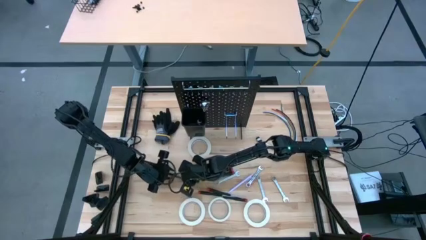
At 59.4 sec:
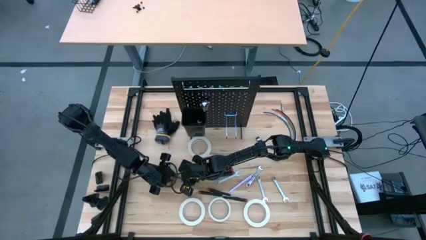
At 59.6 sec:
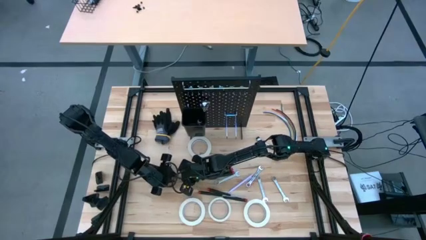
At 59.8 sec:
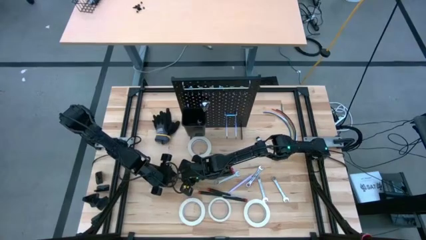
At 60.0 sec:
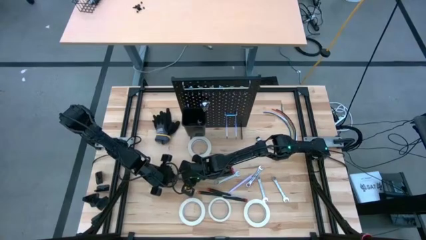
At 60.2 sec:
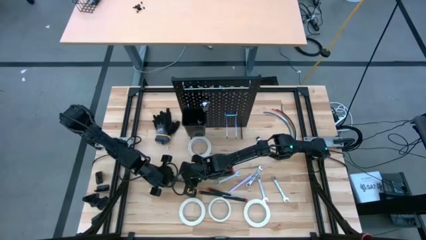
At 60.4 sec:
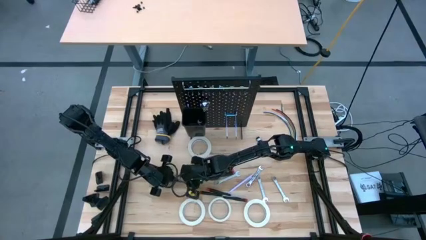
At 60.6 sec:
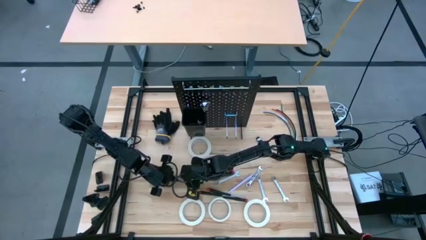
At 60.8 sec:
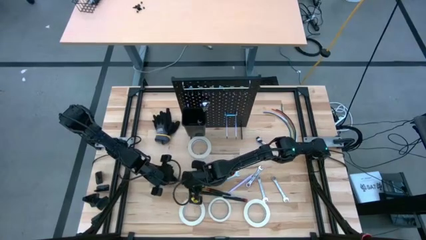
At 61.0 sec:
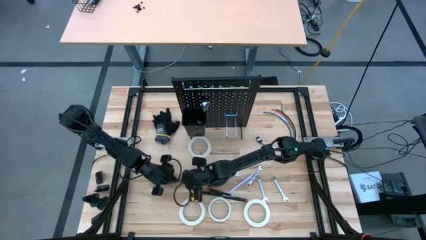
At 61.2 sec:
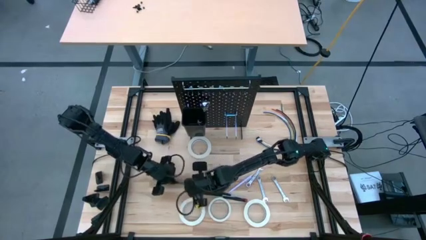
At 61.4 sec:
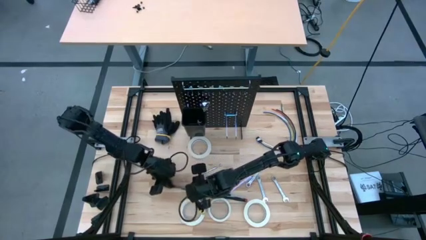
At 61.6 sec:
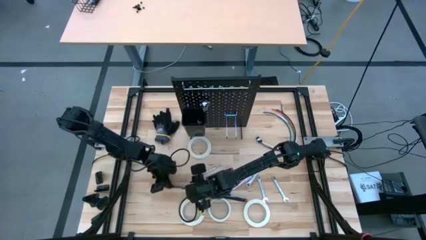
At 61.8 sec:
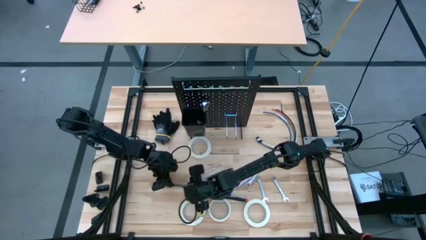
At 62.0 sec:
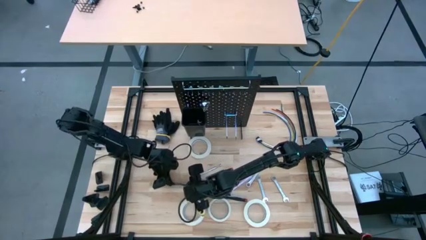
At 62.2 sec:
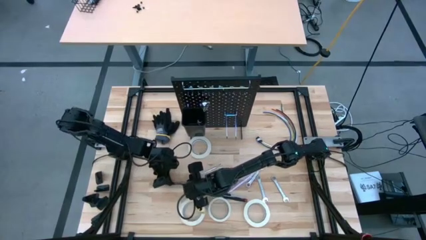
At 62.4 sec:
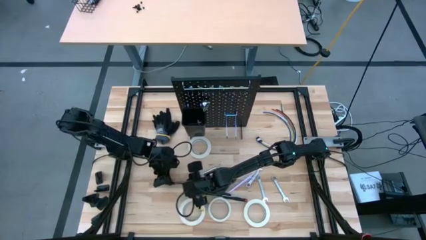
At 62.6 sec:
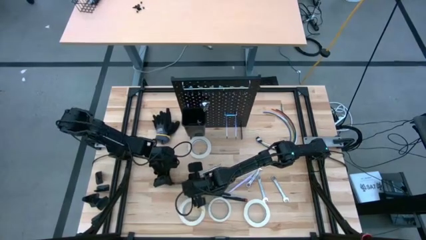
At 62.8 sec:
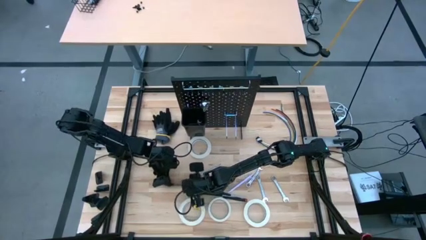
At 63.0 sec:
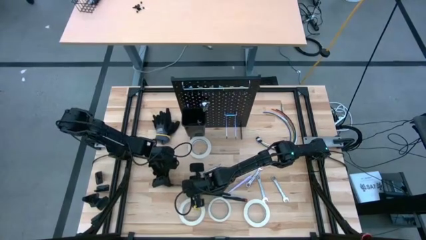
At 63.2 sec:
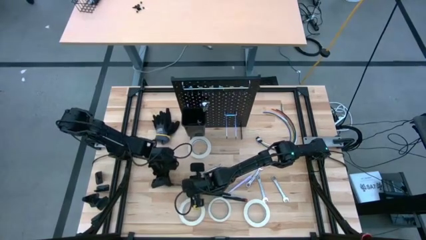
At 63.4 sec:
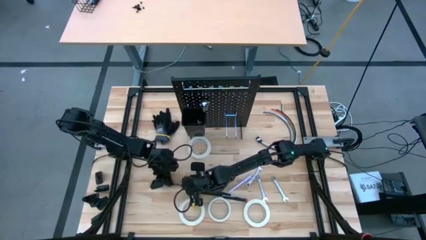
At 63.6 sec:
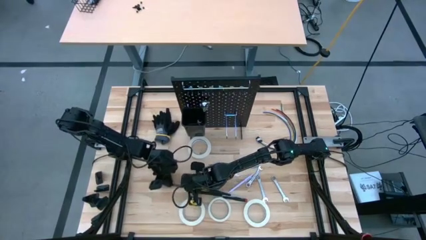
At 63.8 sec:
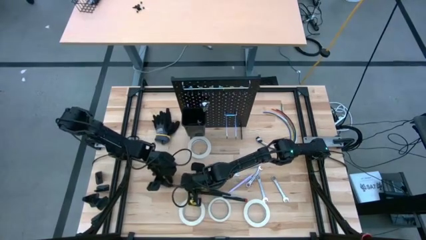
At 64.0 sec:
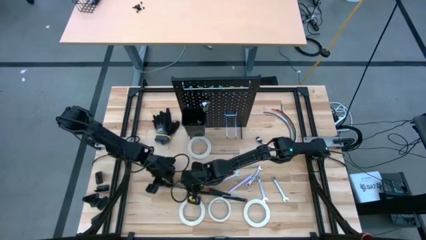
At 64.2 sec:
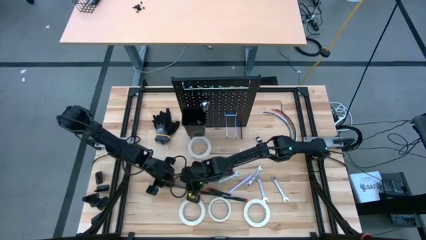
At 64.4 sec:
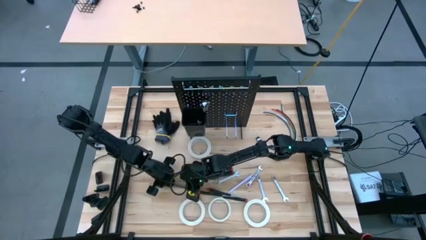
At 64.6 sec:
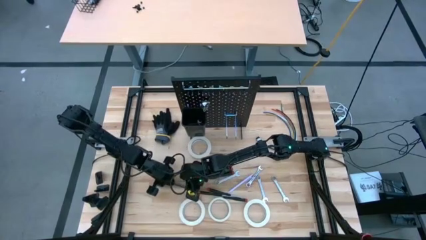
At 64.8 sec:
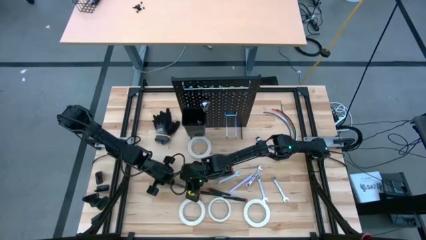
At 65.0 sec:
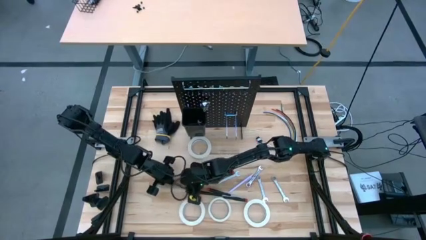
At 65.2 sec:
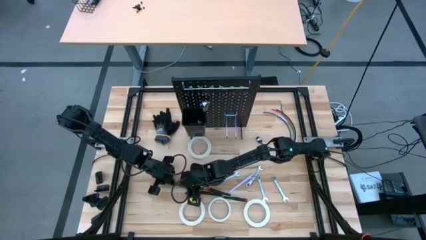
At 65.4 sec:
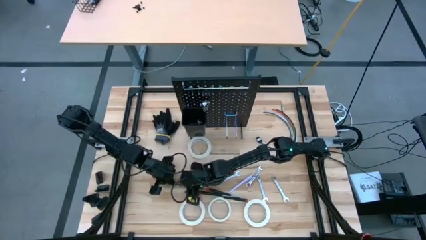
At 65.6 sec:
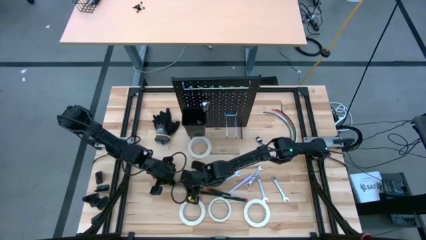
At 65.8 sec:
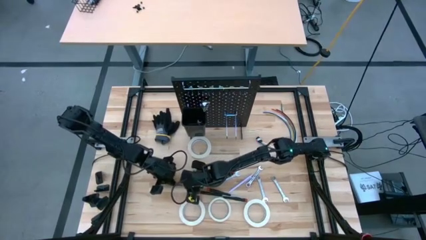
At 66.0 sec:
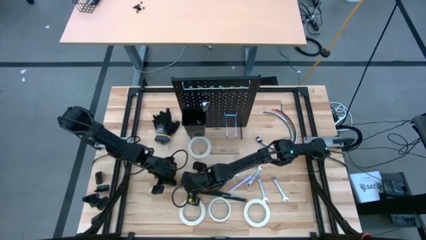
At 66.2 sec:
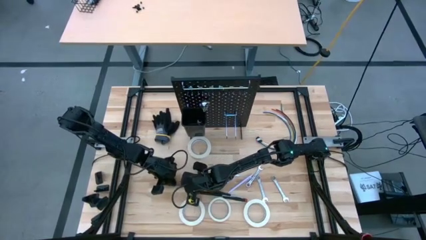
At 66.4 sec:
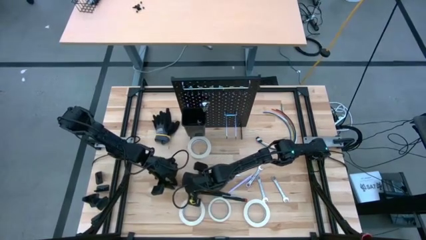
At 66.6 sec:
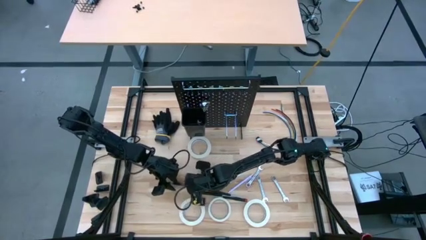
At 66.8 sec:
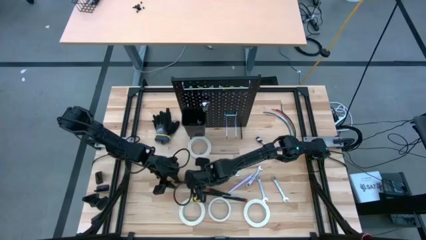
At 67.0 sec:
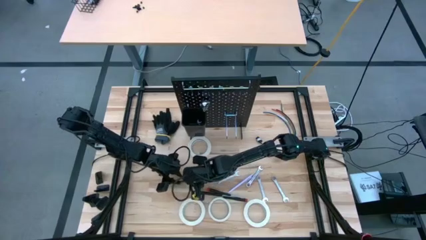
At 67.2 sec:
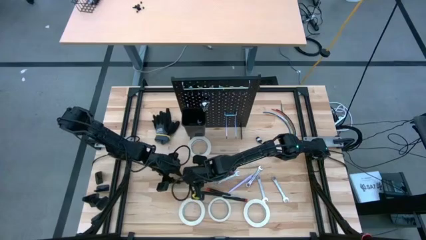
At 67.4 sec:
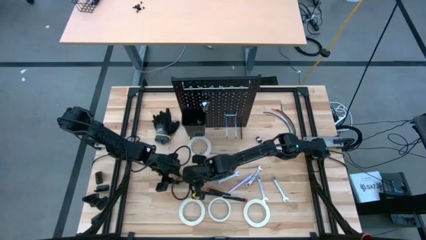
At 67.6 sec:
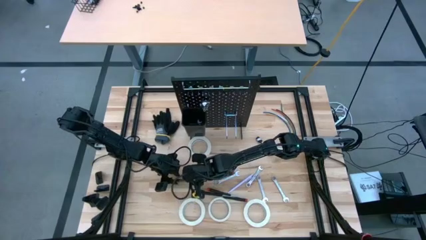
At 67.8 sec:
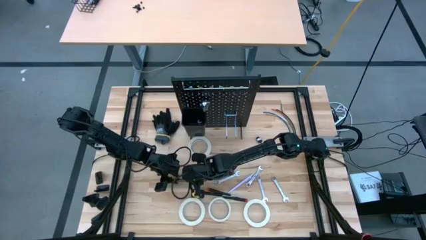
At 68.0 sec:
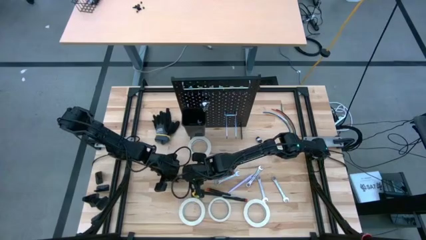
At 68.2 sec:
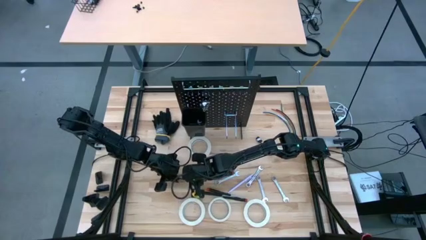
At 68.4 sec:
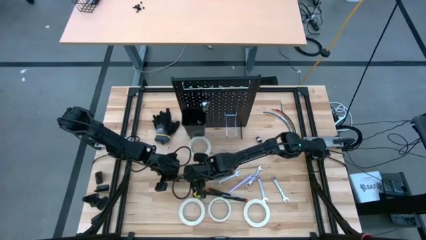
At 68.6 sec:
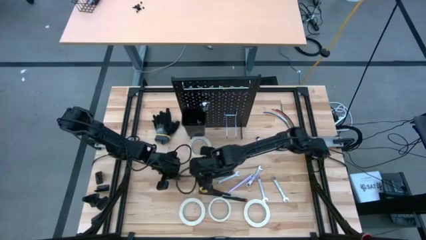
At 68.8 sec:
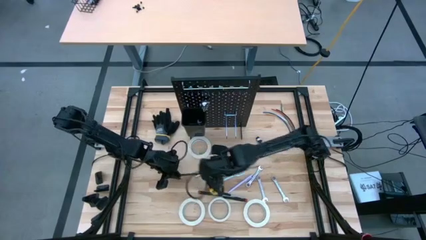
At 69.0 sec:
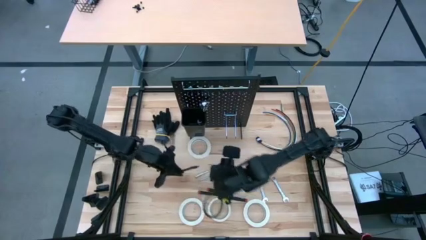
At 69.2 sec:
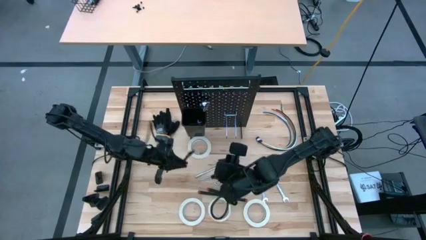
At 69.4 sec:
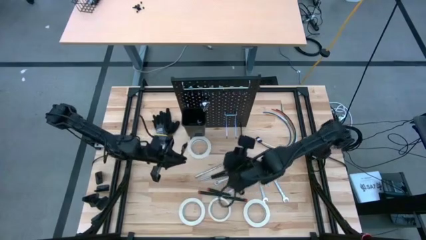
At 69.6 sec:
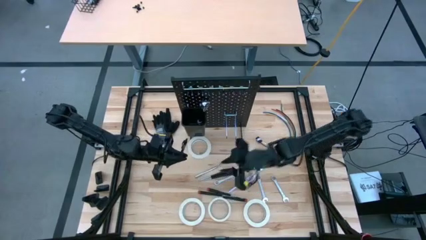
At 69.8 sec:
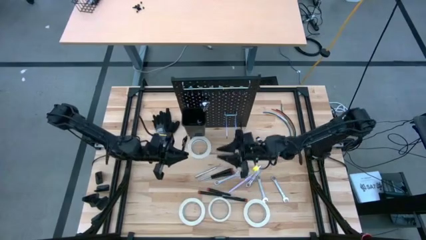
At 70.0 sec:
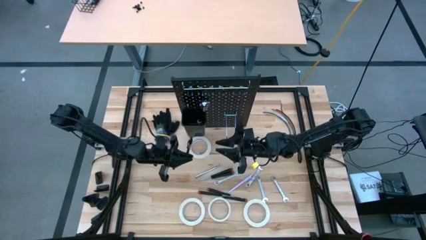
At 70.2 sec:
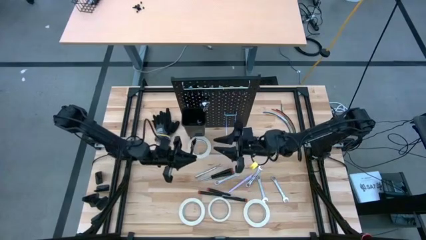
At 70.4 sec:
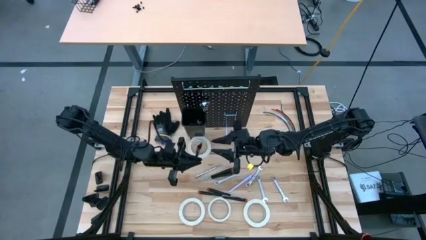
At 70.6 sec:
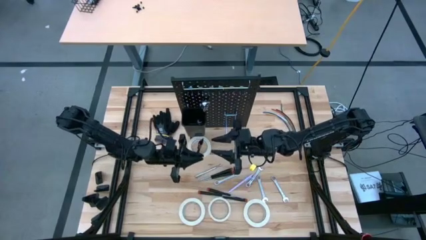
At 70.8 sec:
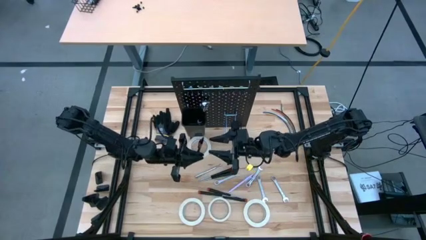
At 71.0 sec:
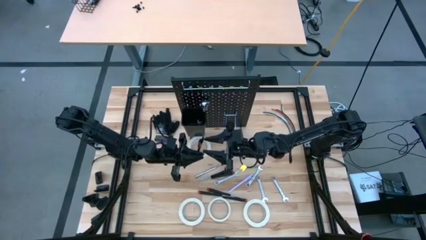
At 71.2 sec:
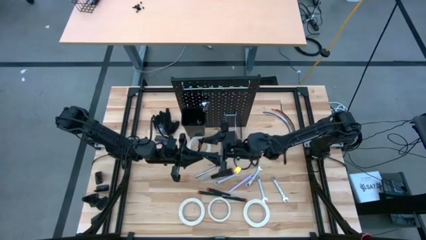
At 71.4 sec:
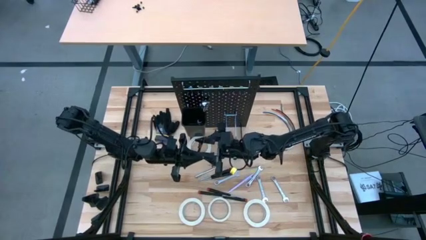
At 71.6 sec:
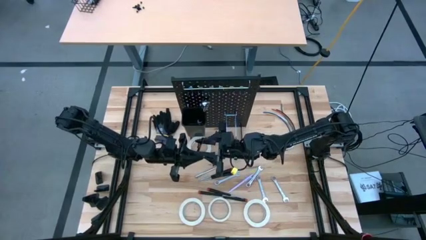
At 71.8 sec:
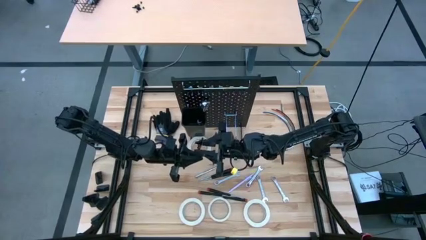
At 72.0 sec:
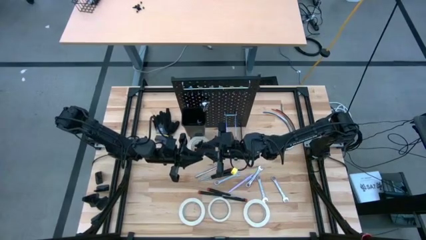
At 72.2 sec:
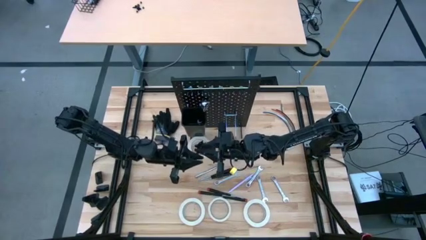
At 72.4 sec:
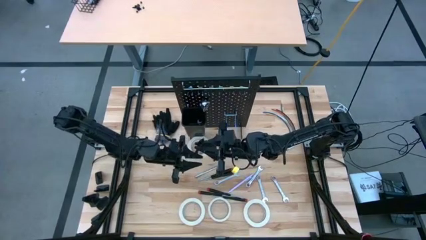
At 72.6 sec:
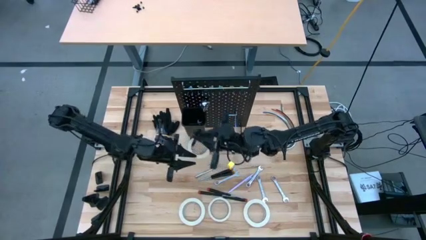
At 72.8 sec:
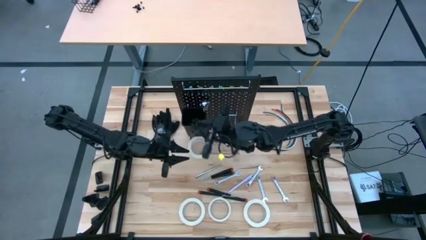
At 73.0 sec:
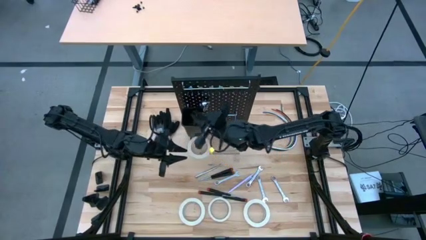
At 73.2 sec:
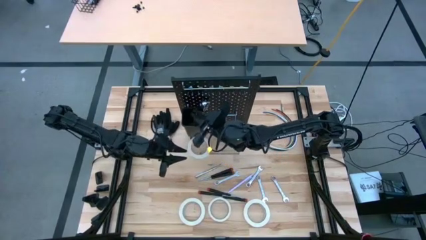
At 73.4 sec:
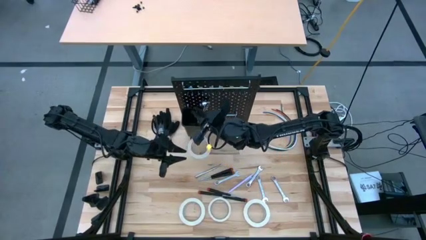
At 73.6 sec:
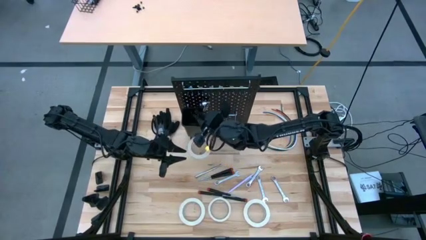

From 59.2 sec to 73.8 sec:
Task: Hang tools onto peg board
Put the black pen into the black bin on the peg board

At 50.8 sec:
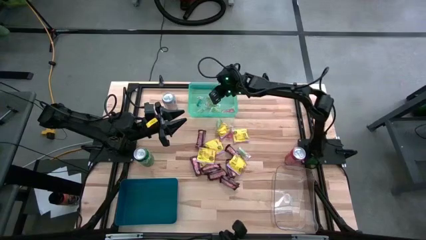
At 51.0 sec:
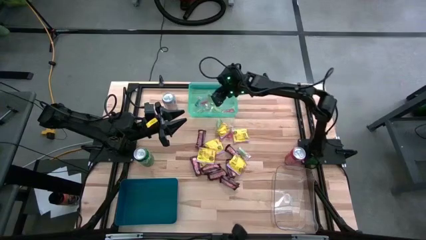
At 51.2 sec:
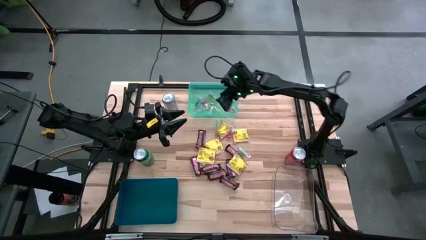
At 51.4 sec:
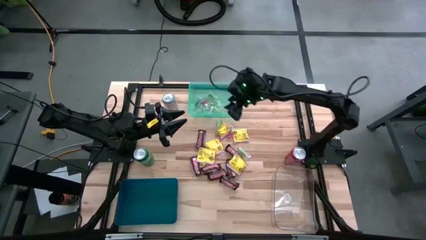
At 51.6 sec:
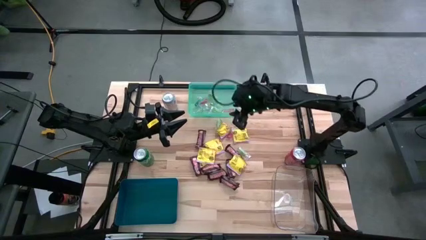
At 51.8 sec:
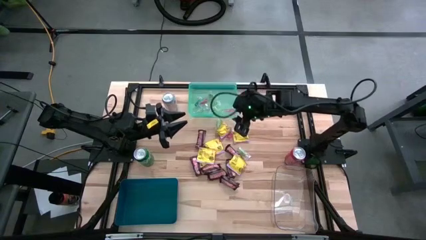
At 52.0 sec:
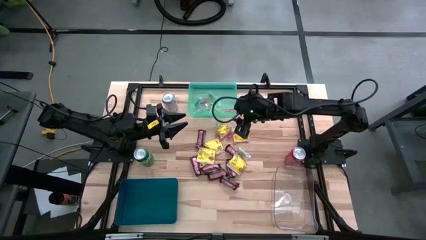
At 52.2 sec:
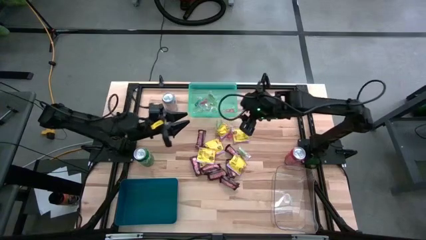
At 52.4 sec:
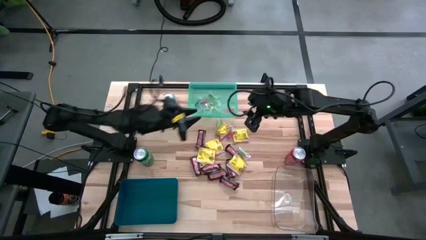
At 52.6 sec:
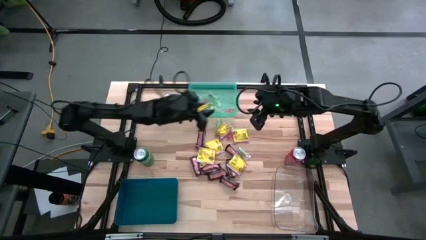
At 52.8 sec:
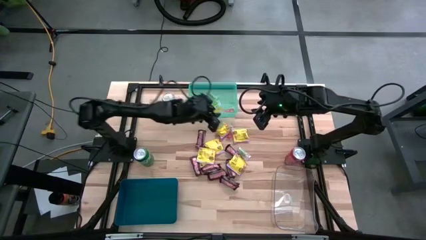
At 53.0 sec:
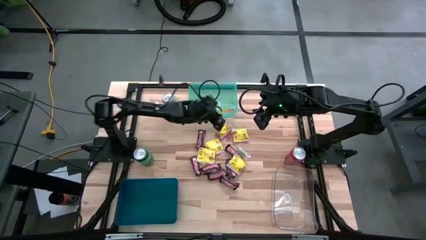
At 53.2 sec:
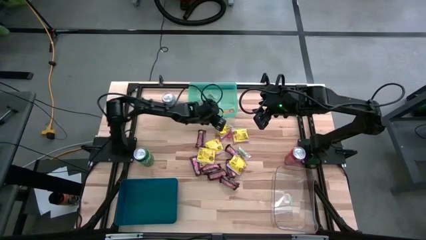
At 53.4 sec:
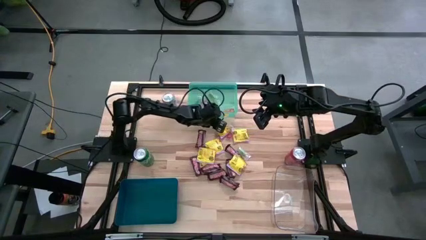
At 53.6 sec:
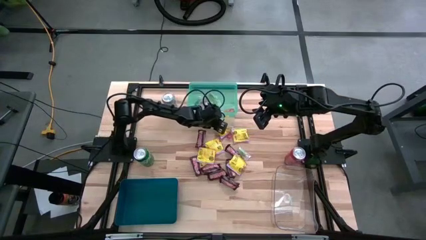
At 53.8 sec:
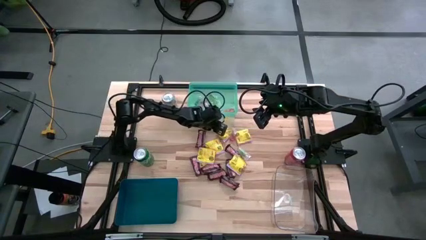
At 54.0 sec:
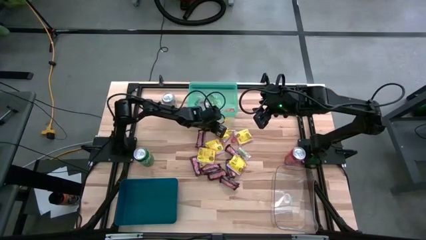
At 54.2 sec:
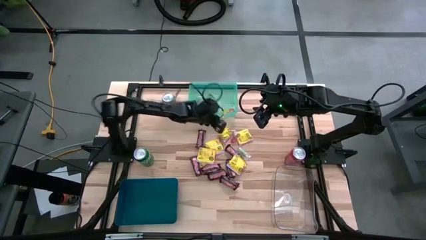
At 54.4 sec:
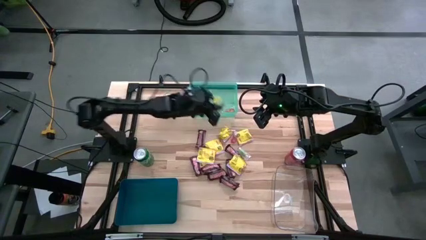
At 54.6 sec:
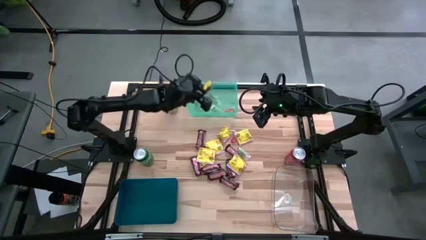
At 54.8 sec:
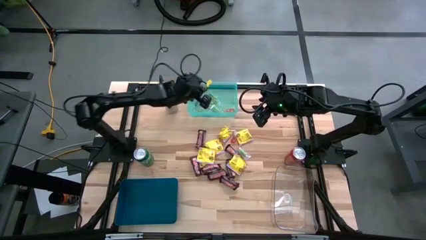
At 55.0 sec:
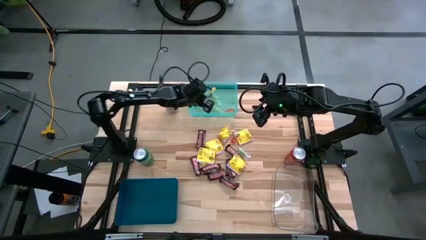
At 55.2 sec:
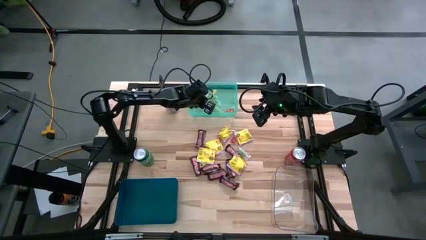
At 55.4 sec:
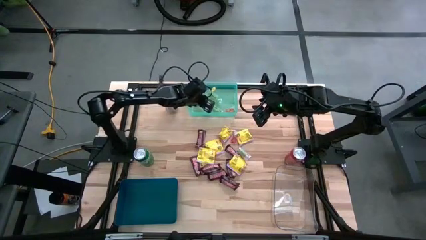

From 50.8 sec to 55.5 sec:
Task: Sort candy
Put the green gummy into the light blue bin
